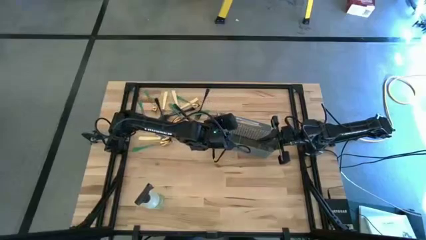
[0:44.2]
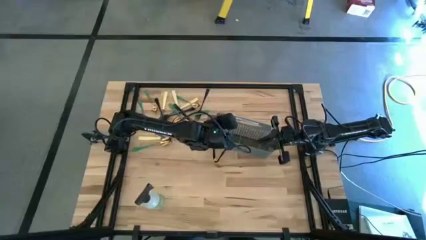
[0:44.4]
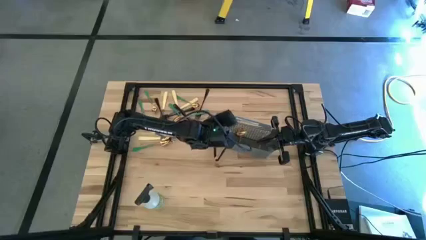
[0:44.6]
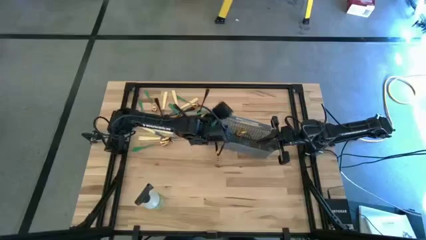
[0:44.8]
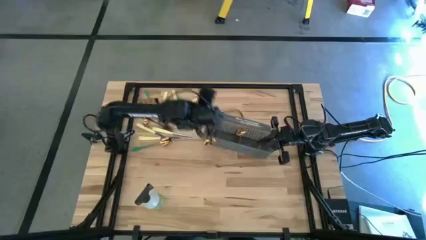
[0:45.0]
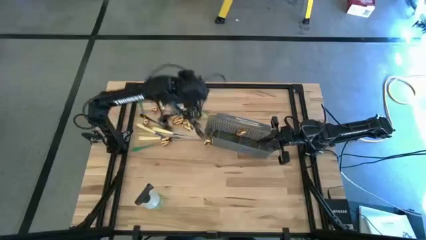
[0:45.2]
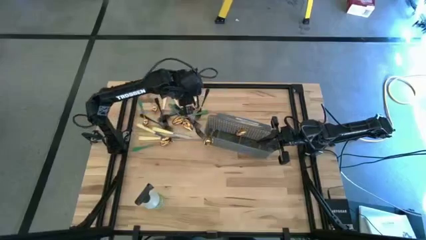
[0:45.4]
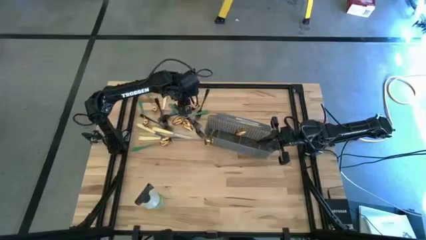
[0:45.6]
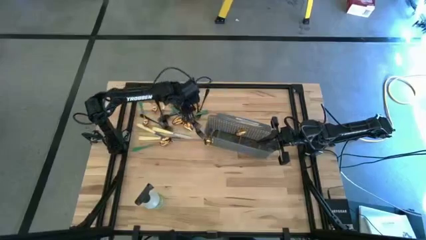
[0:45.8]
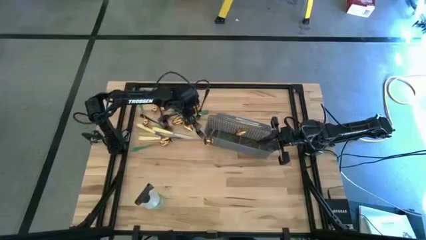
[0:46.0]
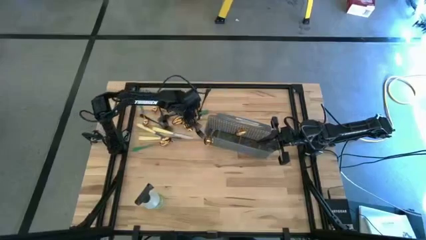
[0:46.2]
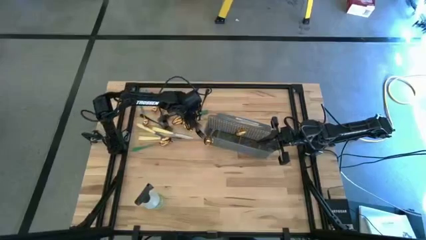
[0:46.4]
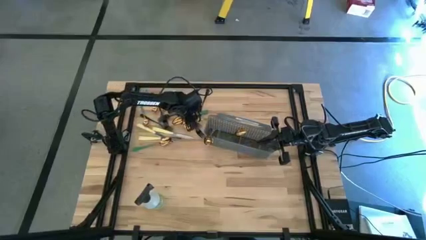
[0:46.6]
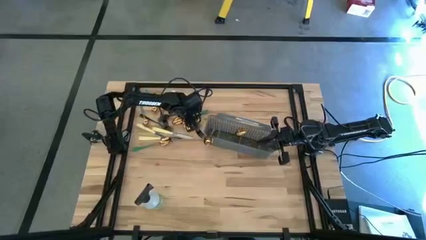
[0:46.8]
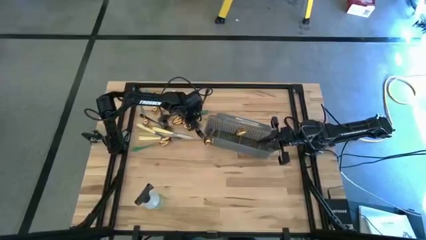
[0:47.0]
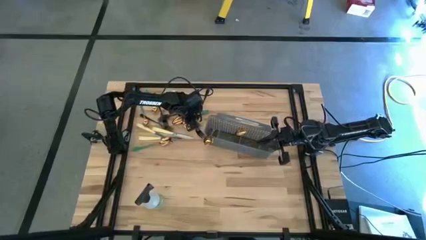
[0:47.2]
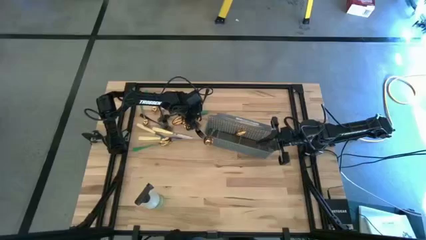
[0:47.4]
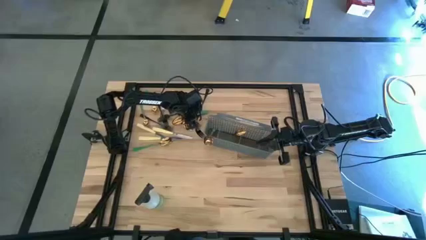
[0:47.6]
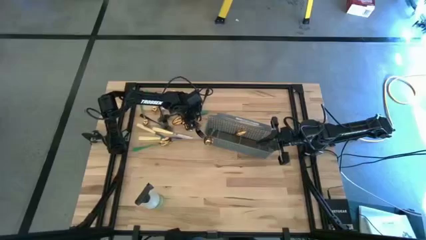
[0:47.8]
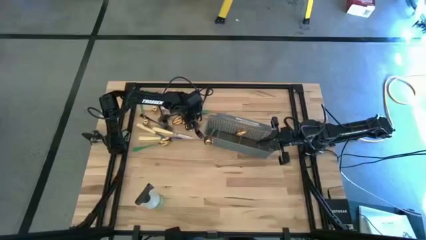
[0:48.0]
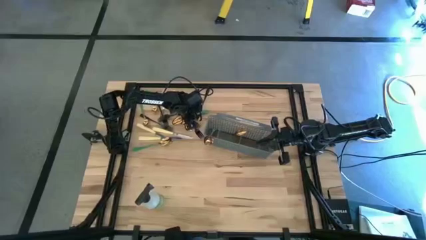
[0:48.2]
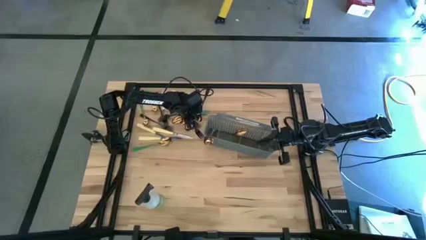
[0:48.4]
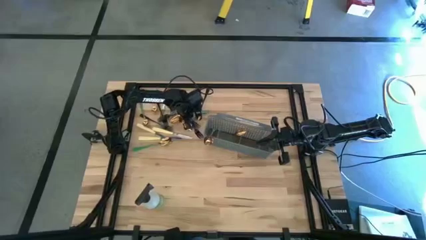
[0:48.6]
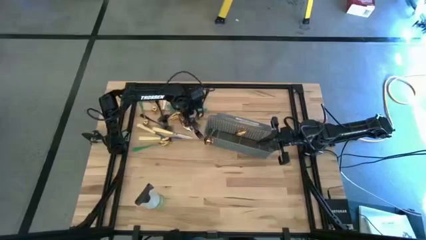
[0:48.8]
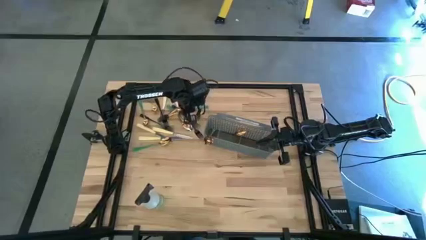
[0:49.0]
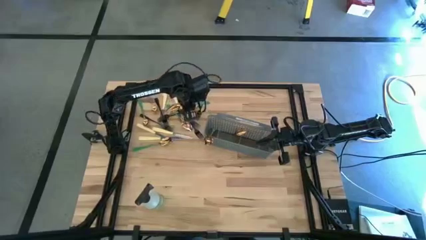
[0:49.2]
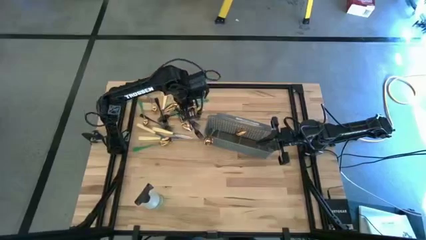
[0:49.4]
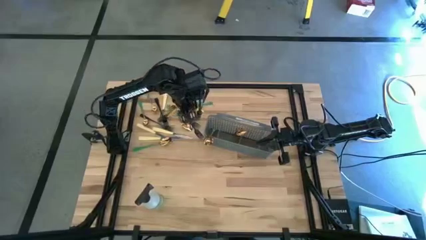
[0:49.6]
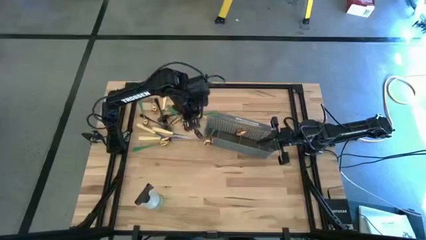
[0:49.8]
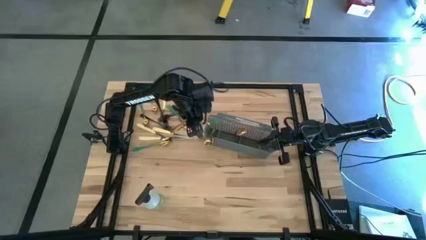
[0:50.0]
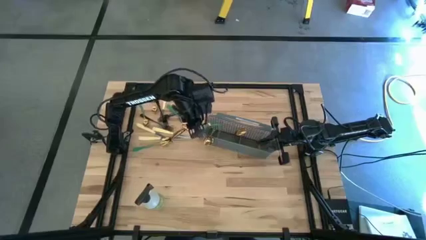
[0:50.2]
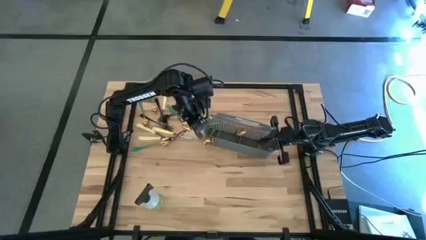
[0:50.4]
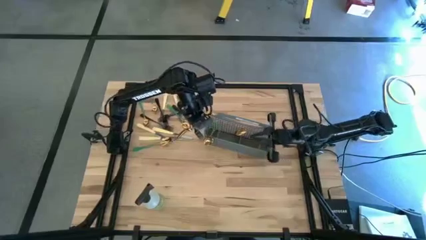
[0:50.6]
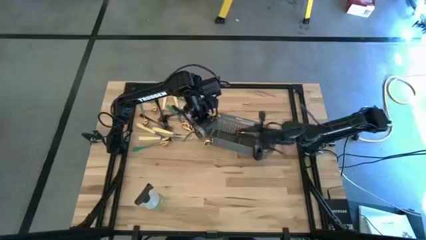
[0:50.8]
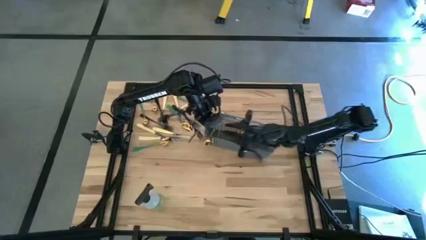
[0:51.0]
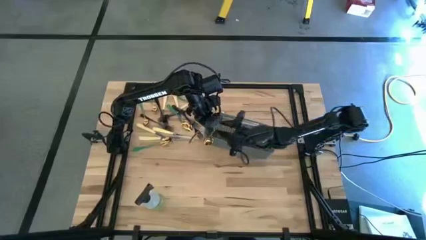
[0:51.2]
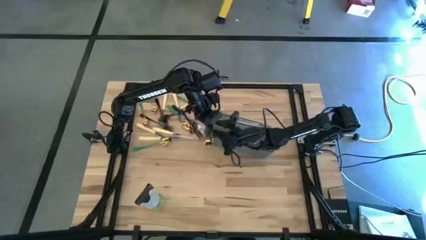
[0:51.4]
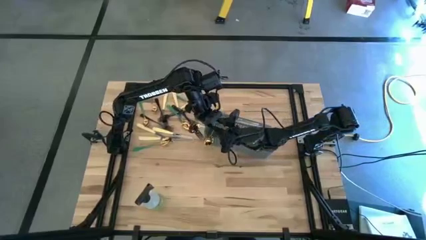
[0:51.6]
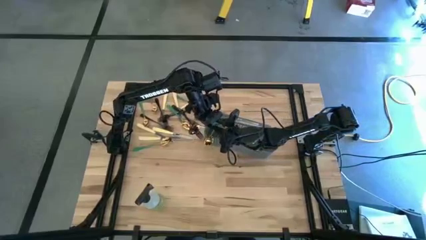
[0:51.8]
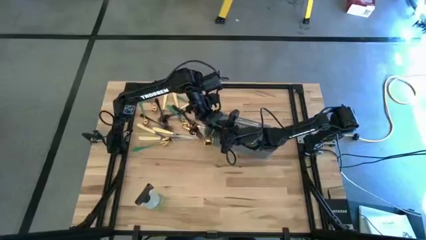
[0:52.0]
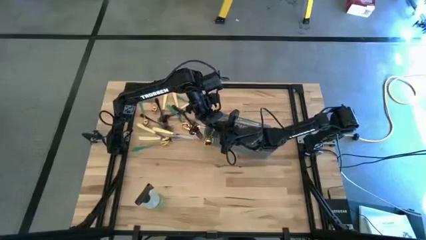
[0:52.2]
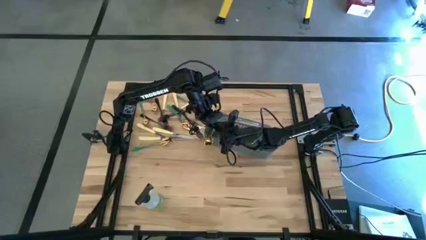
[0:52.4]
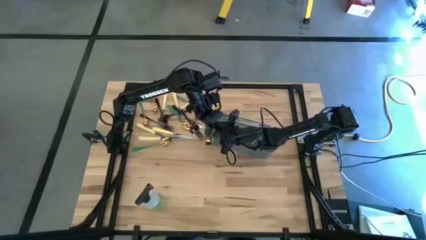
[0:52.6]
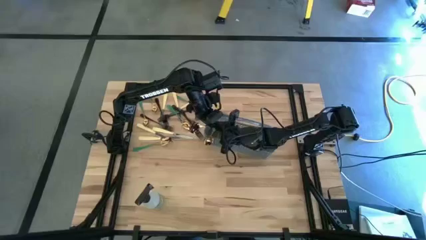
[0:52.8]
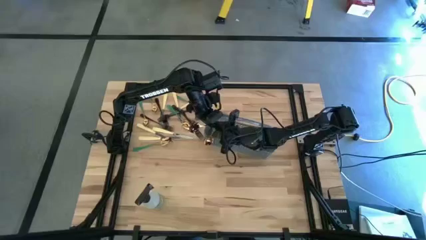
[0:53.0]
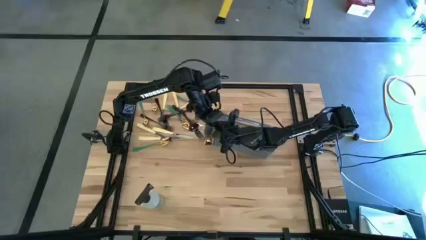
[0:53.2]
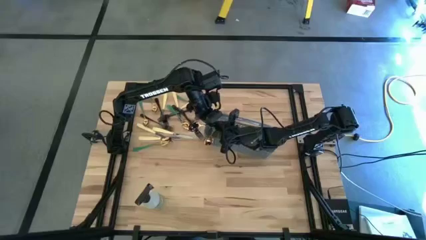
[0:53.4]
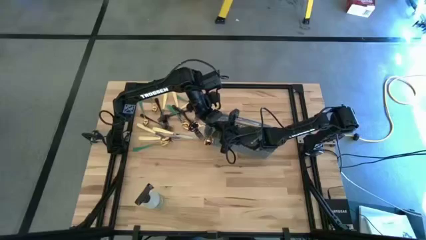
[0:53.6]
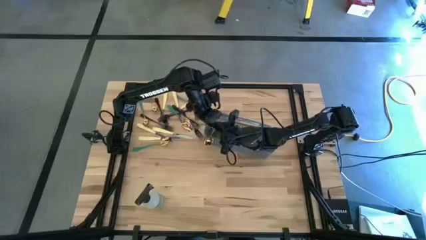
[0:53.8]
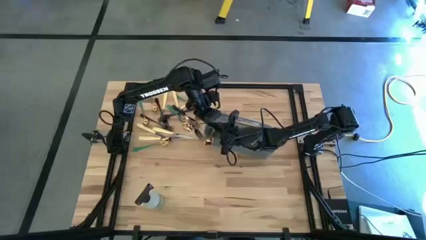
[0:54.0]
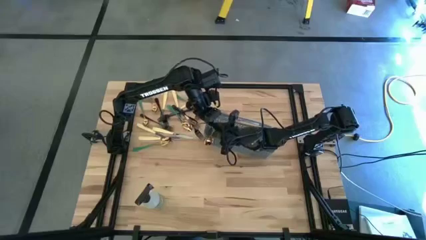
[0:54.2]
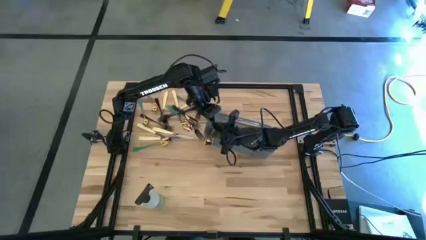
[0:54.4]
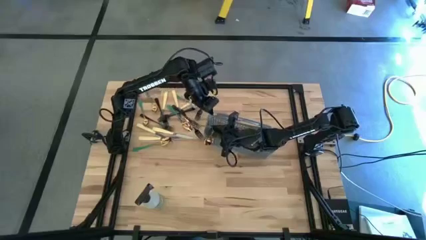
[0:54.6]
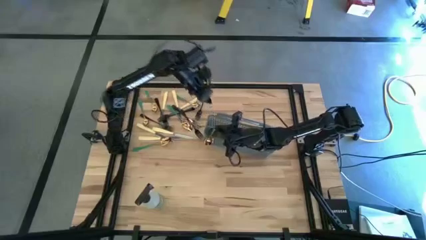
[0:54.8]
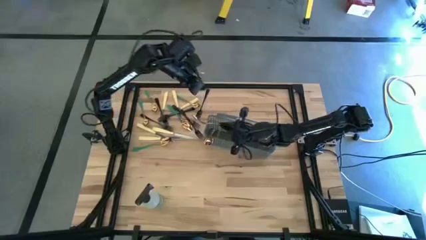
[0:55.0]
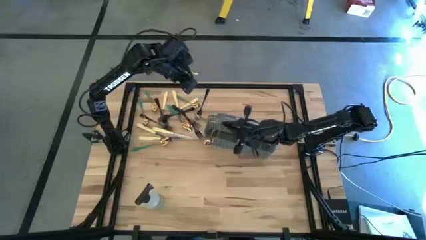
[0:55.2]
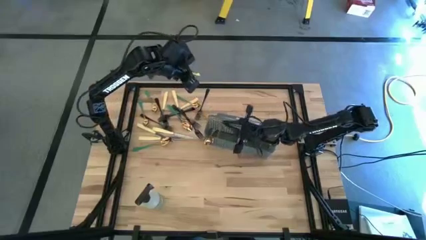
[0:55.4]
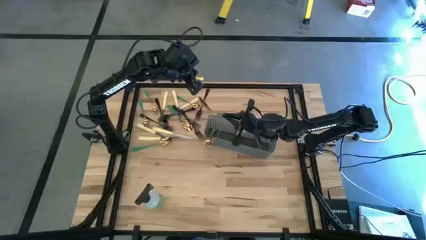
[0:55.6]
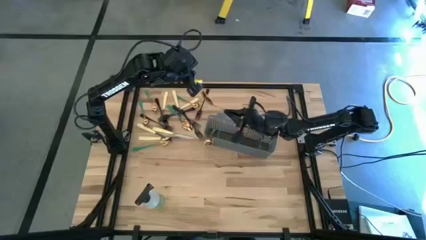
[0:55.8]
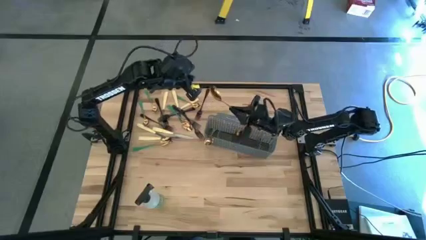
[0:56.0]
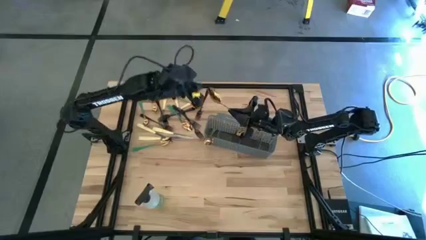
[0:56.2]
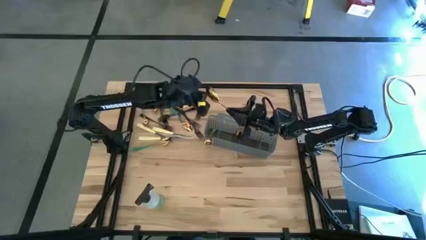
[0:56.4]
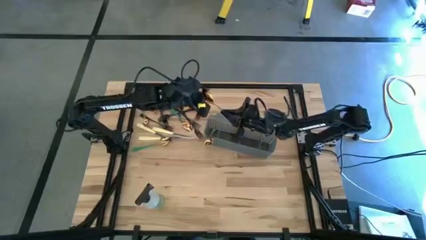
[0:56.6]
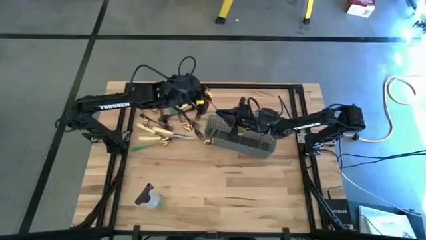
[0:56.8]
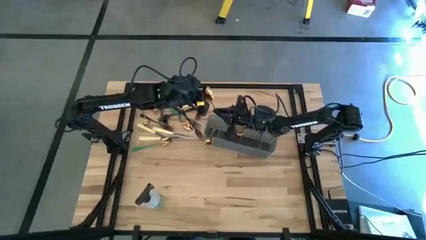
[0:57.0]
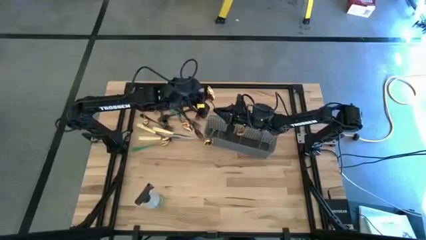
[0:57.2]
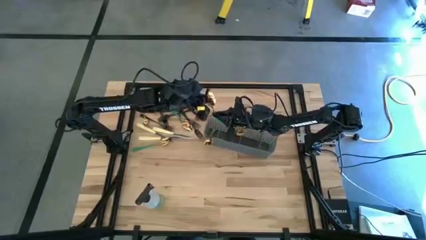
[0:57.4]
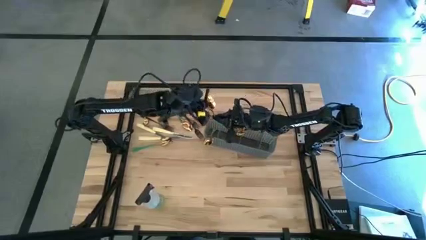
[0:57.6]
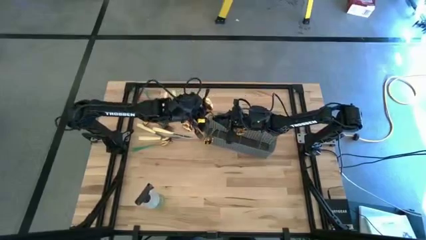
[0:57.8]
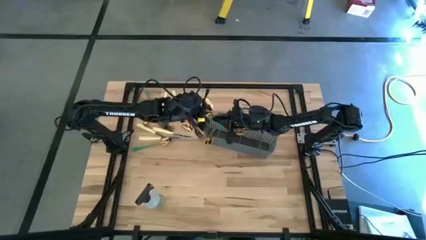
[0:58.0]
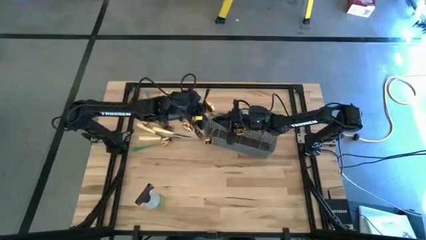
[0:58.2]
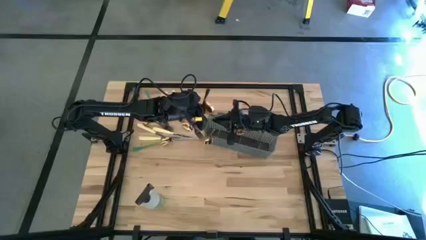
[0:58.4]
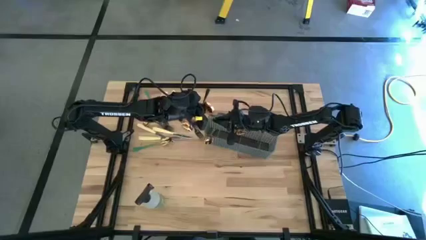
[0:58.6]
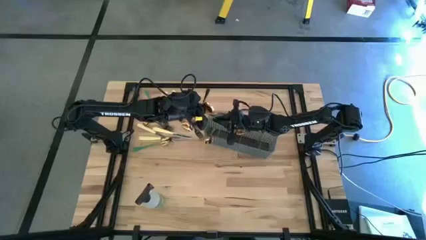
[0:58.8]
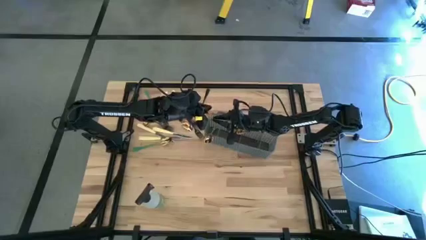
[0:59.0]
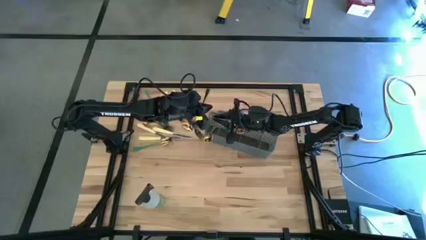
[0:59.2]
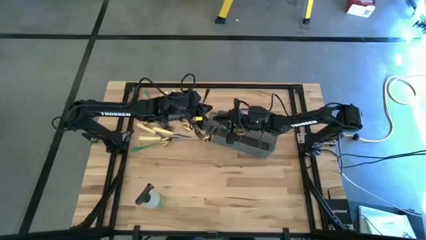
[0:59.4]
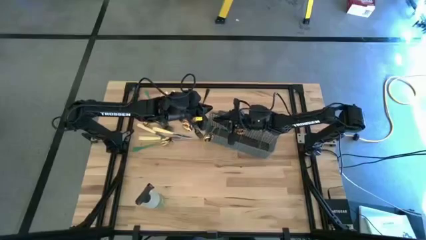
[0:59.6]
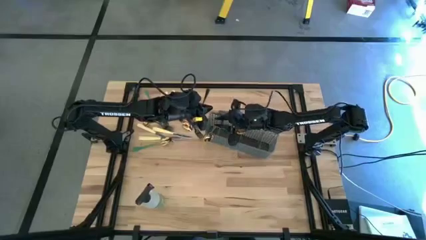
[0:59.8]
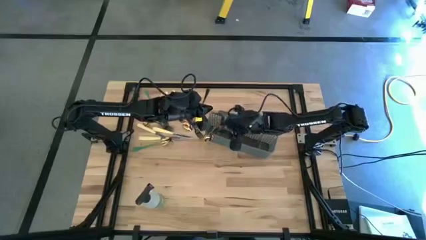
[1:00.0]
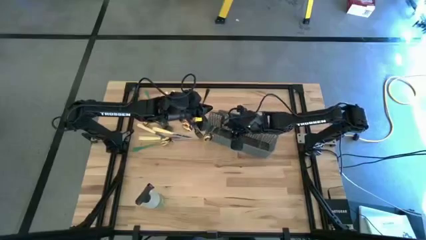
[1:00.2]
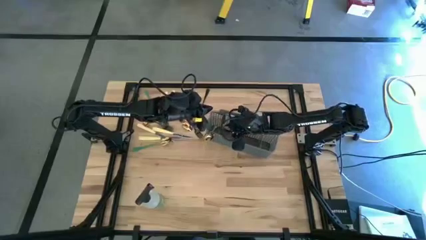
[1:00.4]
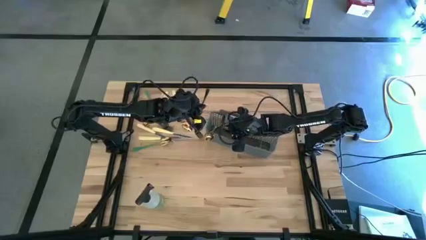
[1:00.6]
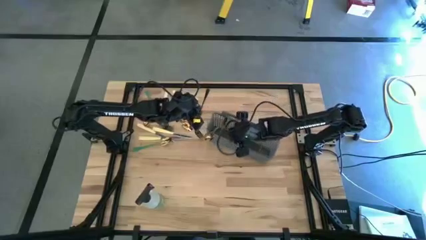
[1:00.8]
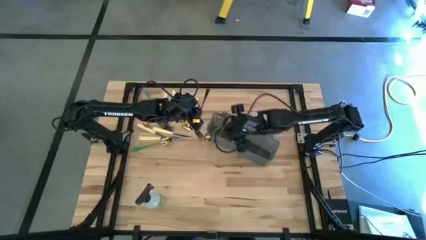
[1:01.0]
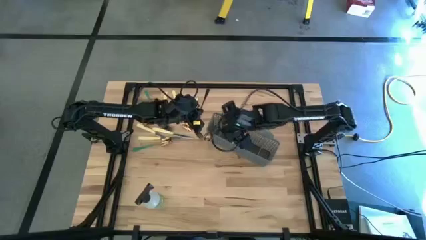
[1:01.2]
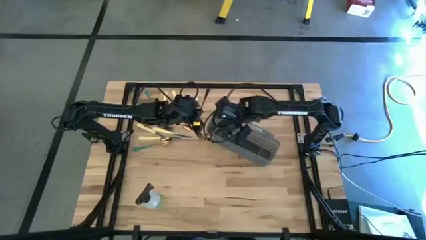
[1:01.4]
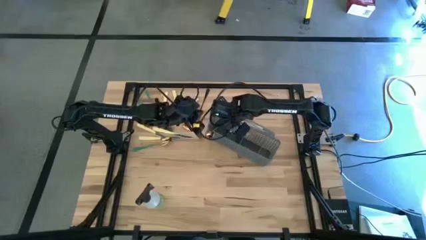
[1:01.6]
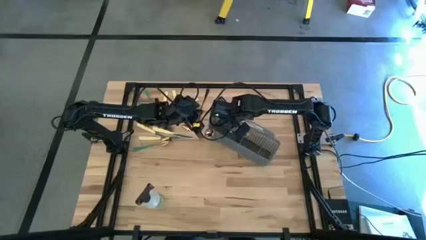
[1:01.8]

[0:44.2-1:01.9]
Task: Sort silverware
Put the gold spoon into the cutlery rack
